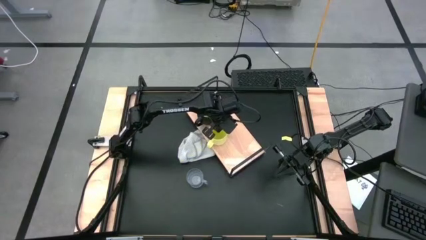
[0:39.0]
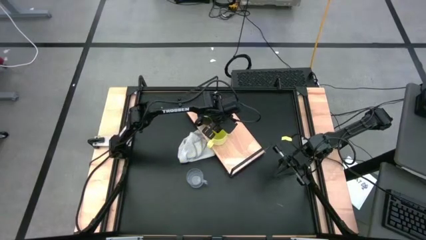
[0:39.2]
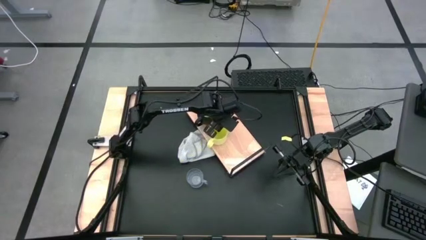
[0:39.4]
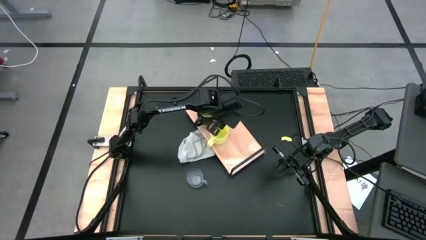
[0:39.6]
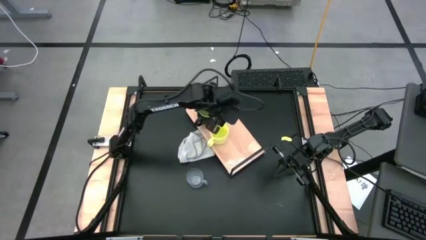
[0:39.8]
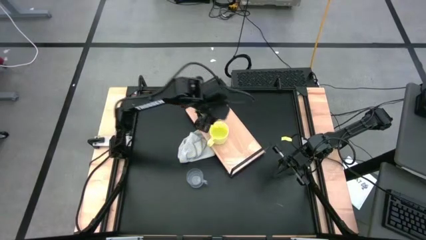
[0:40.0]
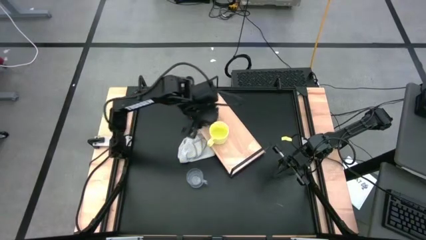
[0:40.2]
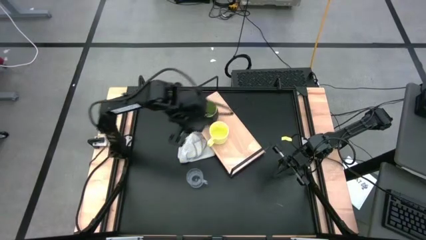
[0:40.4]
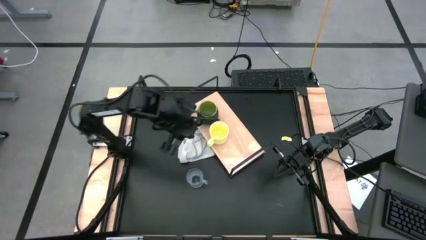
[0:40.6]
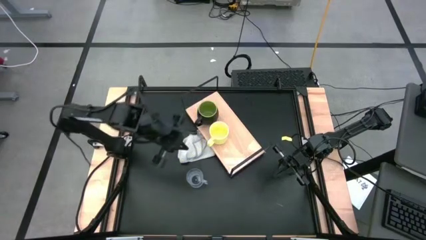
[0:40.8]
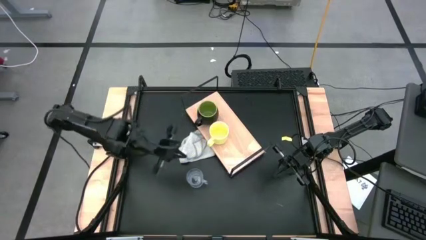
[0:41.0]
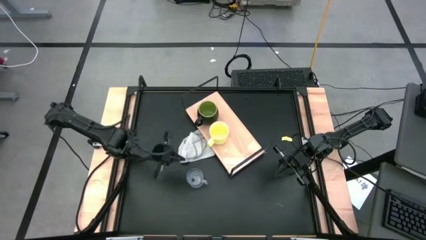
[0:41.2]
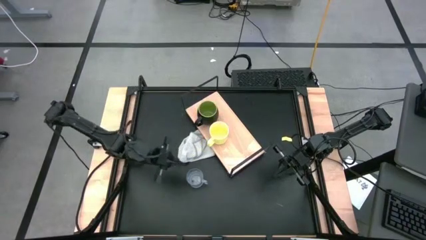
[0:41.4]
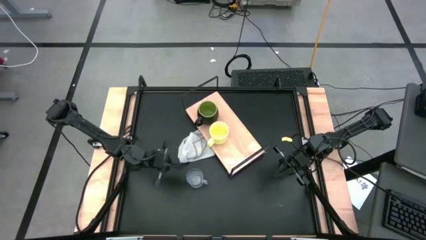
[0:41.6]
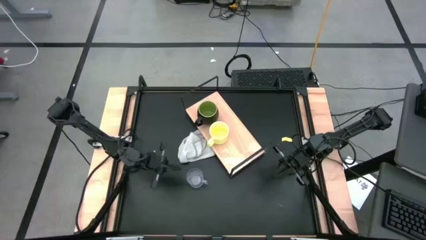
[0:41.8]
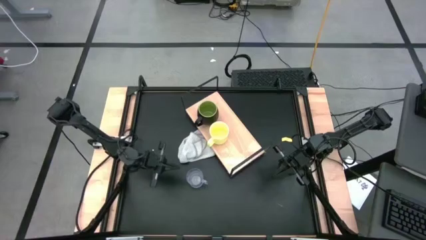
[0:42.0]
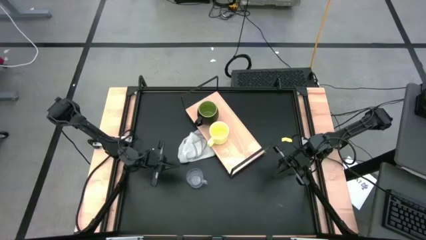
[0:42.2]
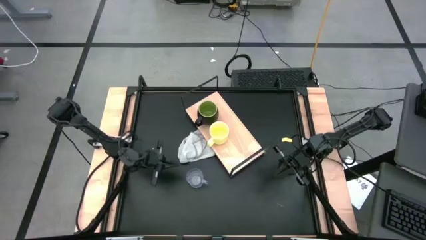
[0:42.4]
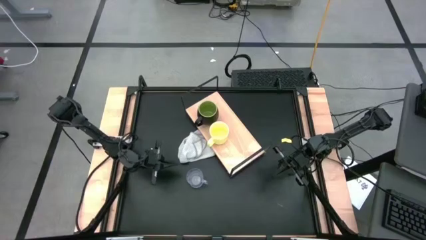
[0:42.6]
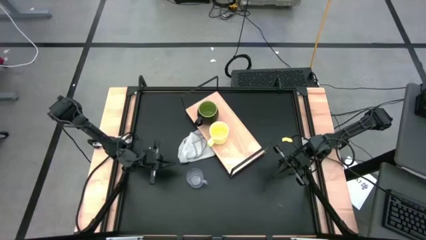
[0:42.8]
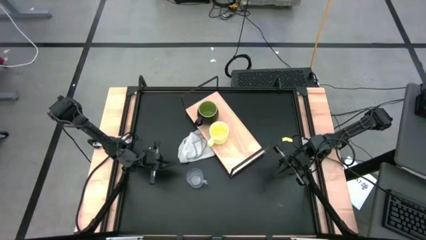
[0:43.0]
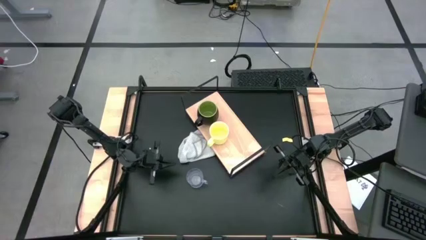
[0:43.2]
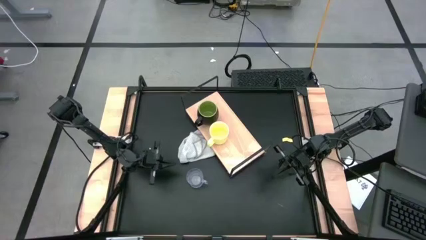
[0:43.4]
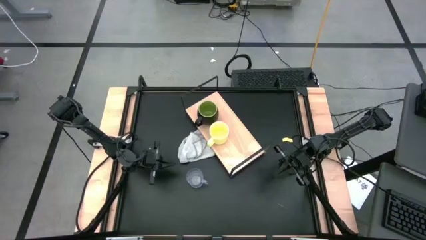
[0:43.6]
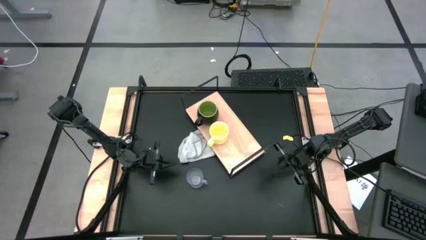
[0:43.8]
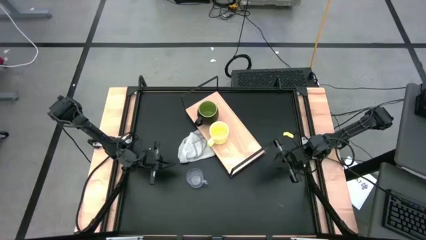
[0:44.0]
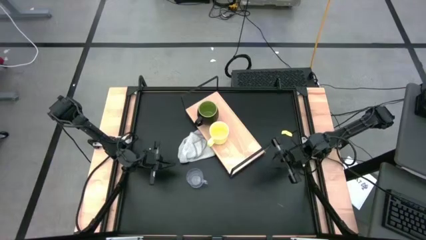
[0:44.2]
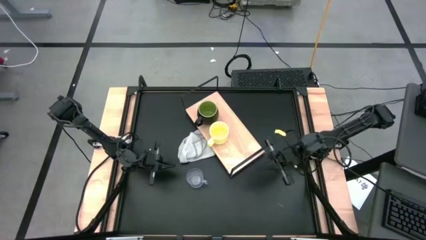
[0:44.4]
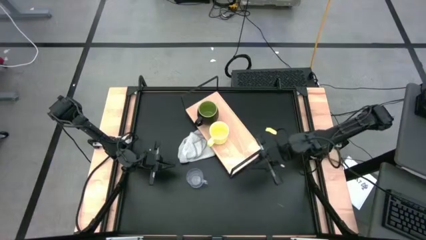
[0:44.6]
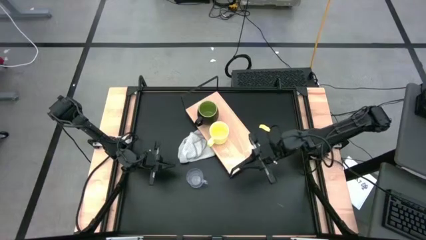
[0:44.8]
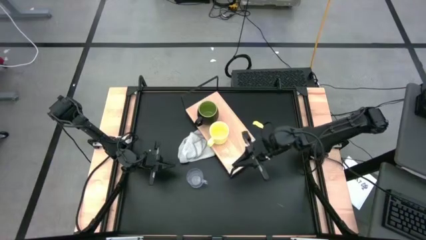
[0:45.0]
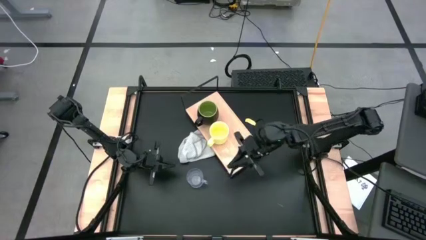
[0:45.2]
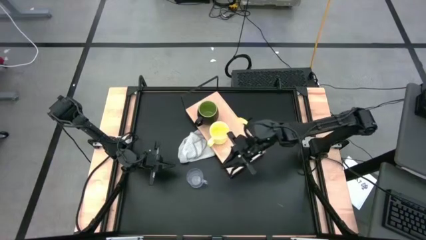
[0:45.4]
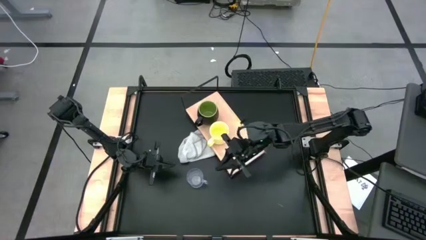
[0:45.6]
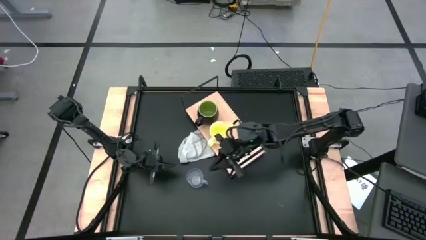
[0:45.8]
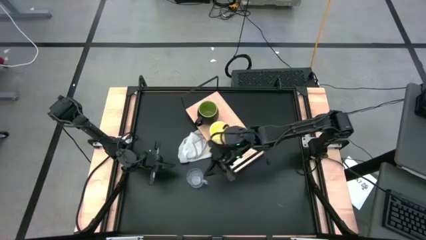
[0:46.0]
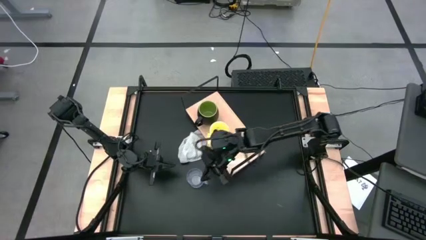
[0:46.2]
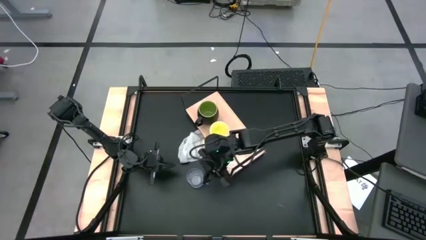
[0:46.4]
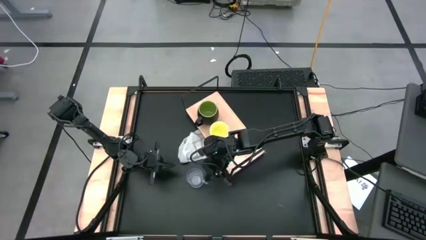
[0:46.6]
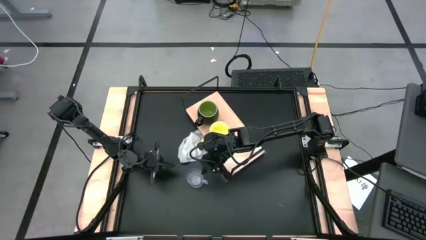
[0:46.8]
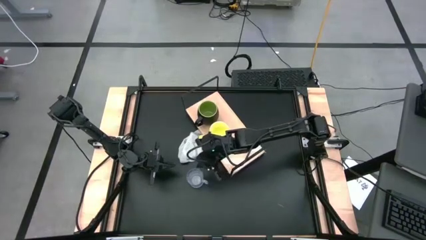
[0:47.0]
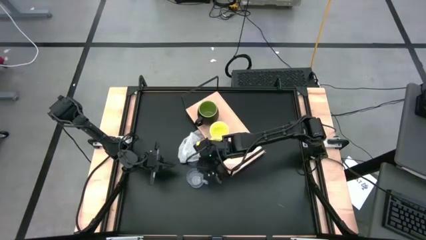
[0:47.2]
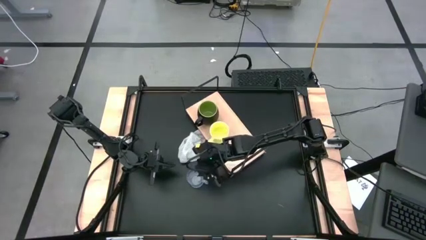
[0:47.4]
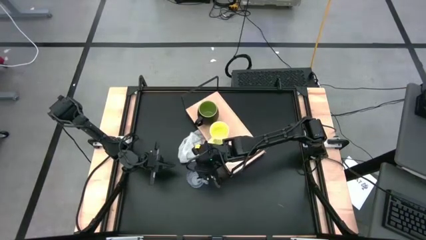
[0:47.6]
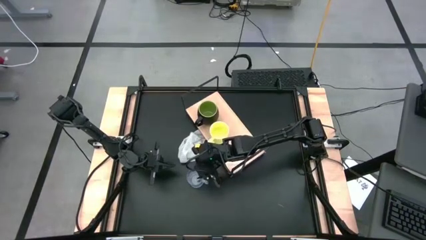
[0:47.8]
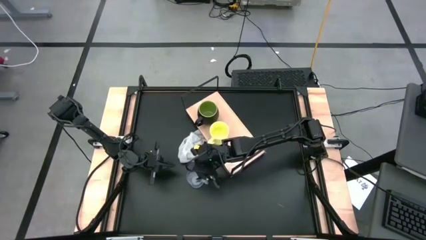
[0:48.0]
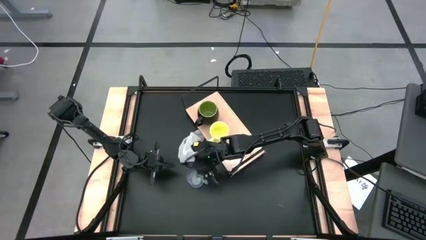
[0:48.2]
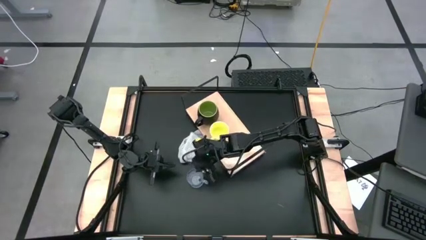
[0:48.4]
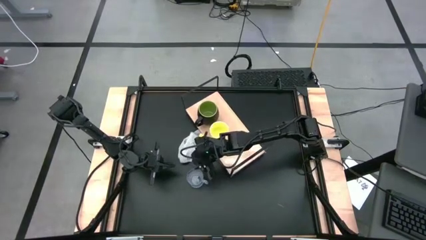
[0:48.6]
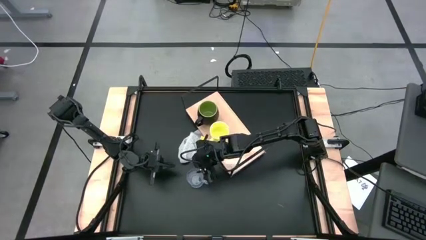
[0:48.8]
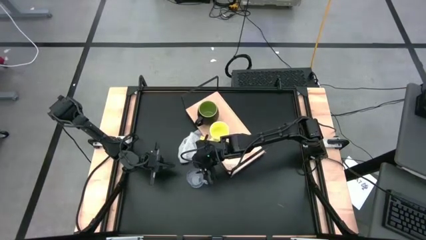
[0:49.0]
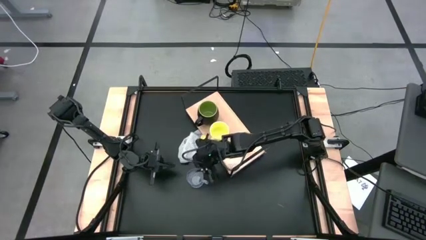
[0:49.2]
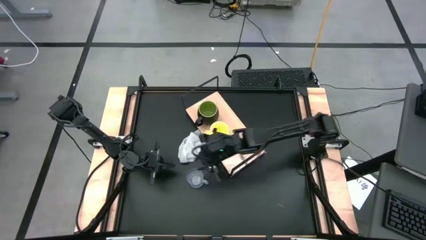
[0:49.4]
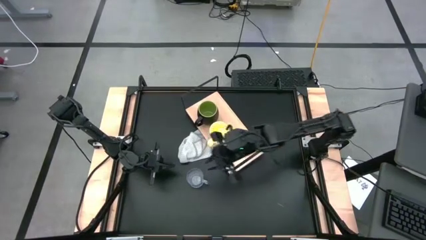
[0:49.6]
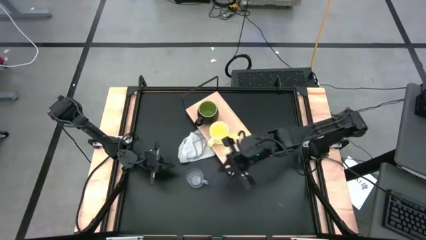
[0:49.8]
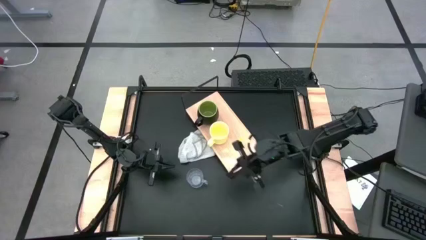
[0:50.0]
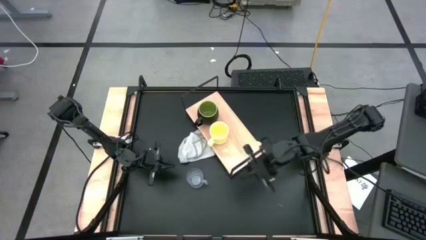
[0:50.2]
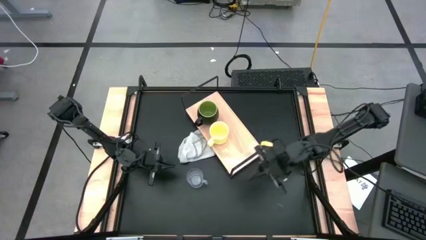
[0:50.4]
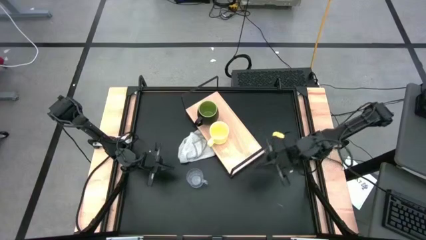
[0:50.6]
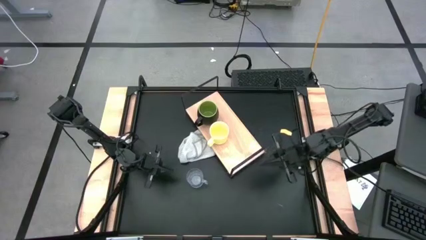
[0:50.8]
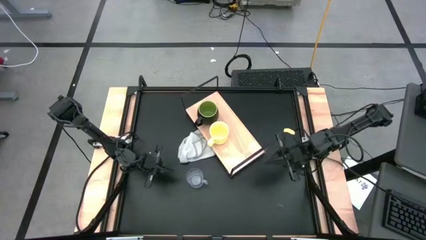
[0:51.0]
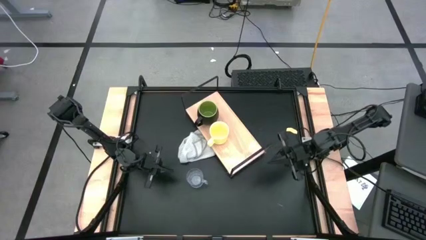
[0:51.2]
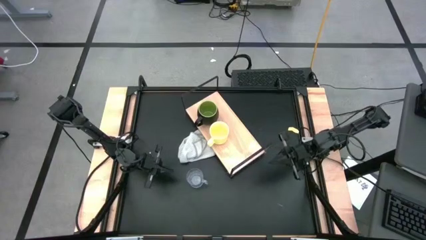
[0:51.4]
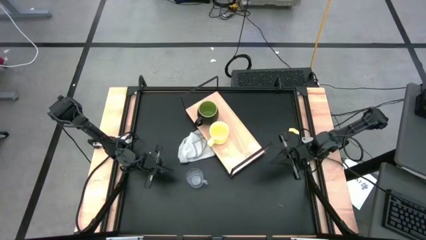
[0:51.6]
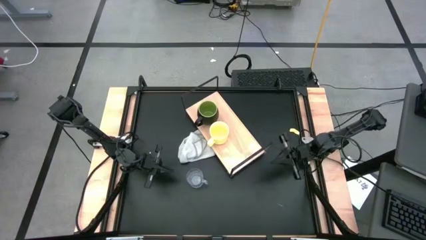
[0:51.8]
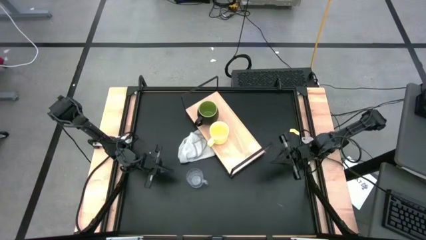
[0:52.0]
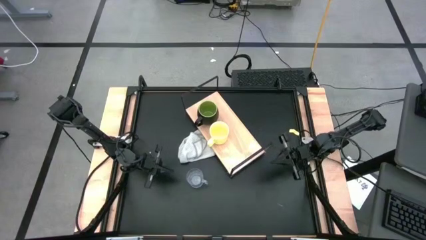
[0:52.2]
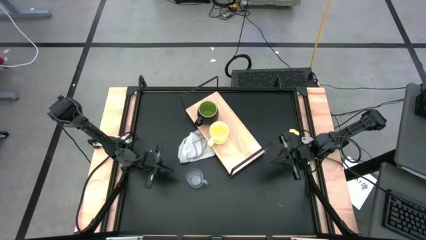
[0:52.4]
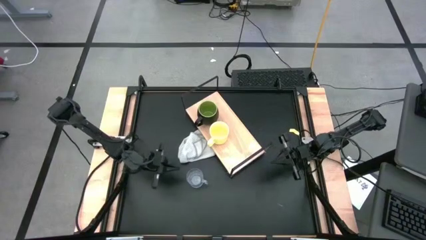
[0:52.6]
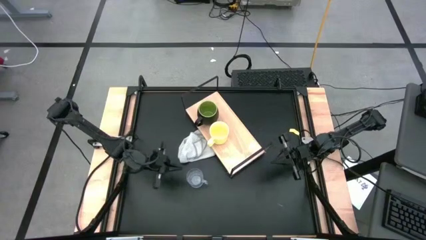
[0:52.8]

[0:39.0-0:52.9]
Task: Stack small to large cups/mugs on shelf
Put the transparent mug on the shelf
